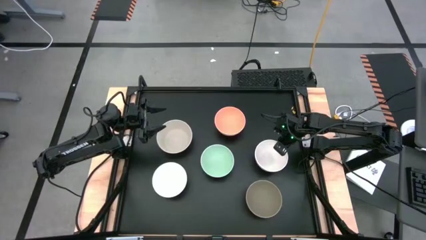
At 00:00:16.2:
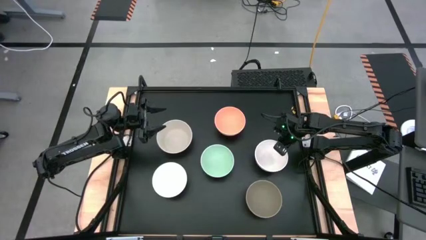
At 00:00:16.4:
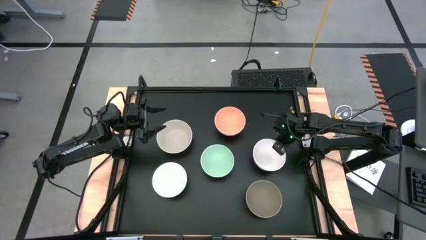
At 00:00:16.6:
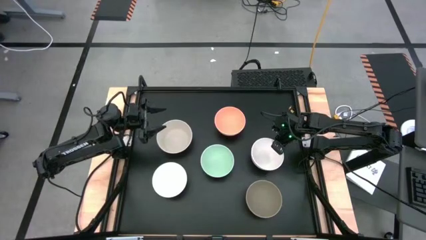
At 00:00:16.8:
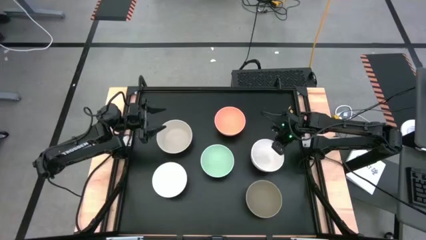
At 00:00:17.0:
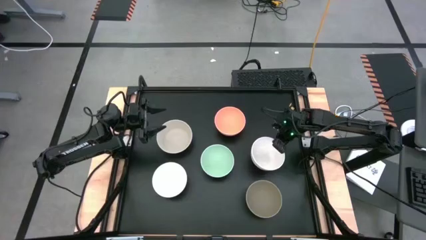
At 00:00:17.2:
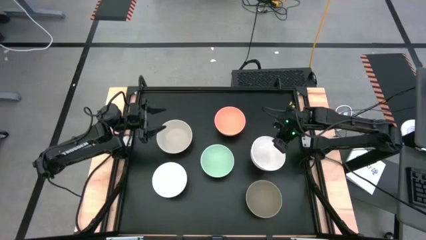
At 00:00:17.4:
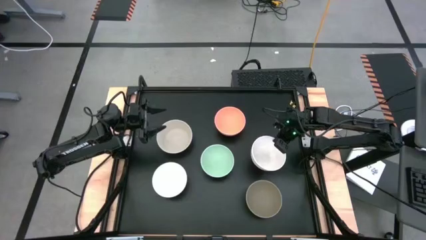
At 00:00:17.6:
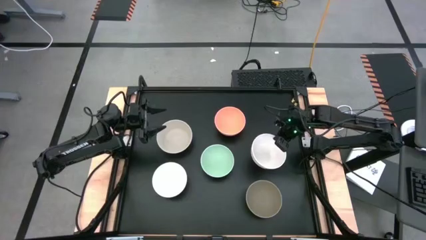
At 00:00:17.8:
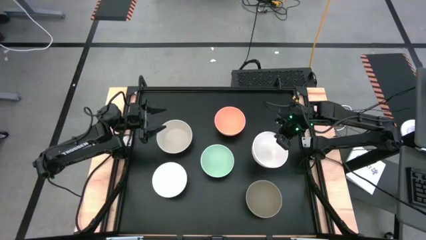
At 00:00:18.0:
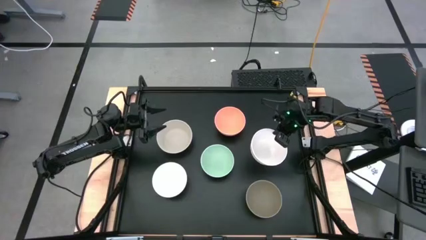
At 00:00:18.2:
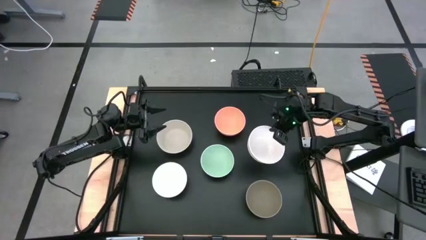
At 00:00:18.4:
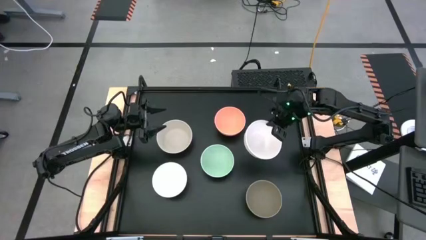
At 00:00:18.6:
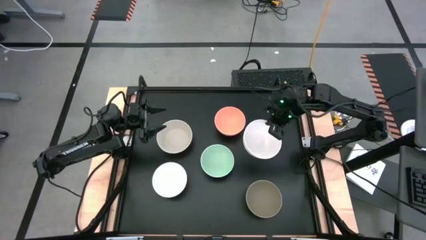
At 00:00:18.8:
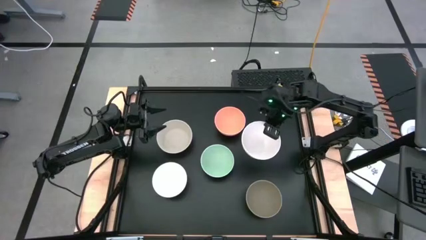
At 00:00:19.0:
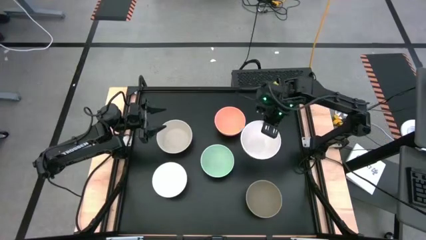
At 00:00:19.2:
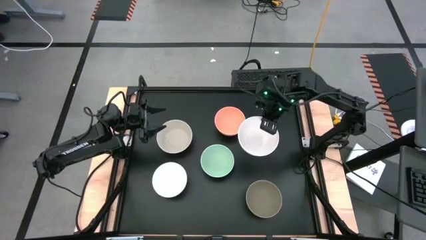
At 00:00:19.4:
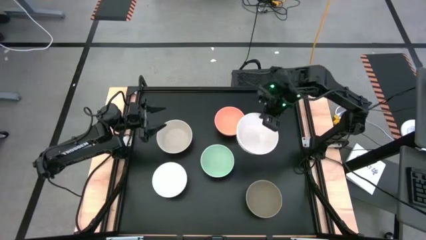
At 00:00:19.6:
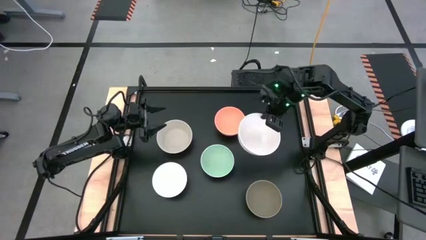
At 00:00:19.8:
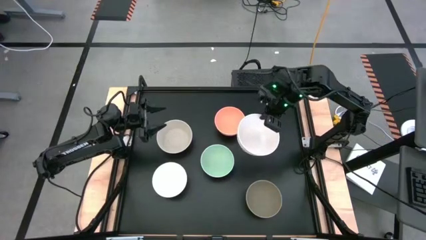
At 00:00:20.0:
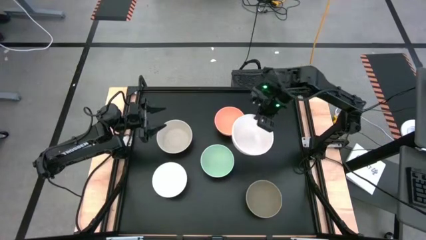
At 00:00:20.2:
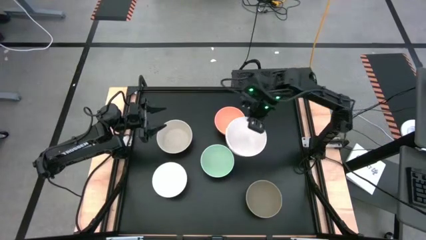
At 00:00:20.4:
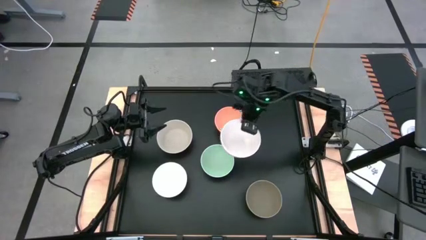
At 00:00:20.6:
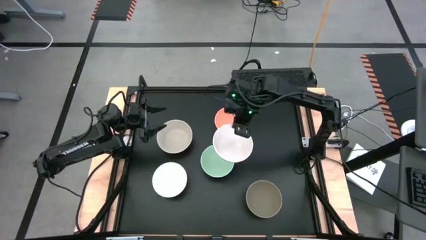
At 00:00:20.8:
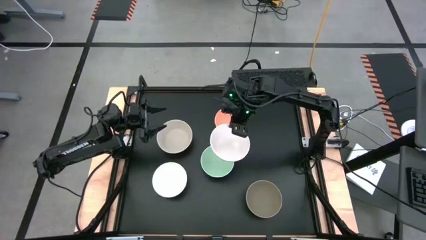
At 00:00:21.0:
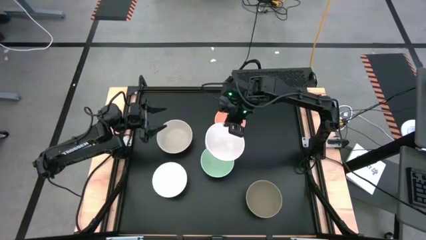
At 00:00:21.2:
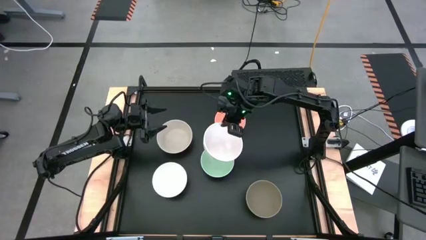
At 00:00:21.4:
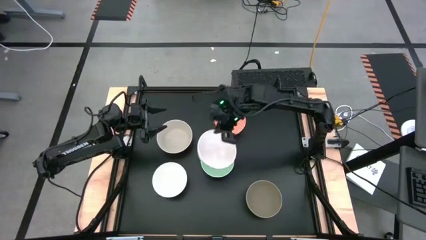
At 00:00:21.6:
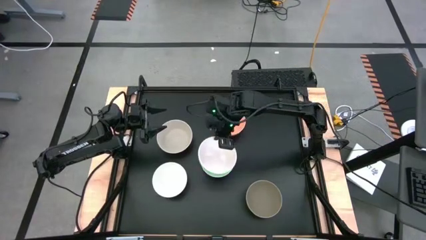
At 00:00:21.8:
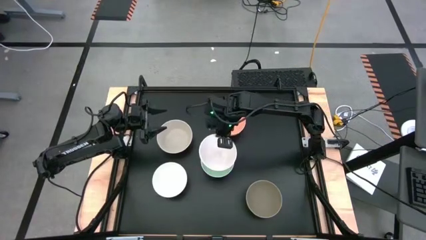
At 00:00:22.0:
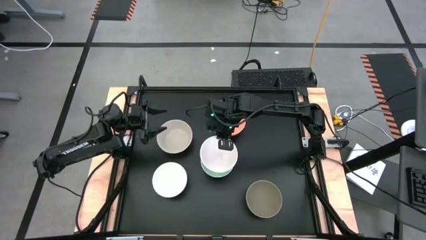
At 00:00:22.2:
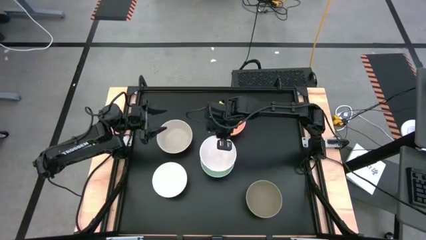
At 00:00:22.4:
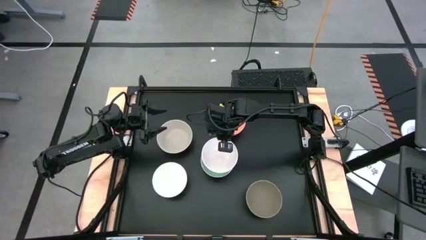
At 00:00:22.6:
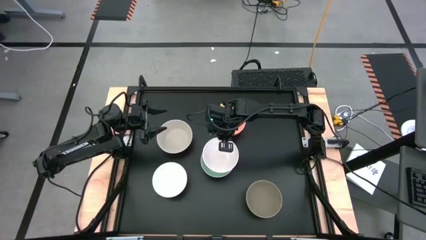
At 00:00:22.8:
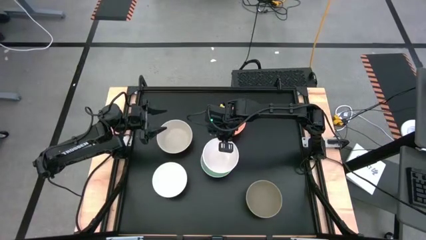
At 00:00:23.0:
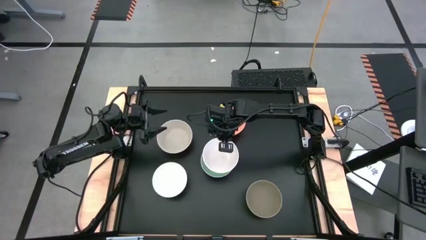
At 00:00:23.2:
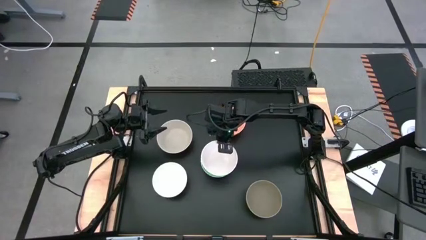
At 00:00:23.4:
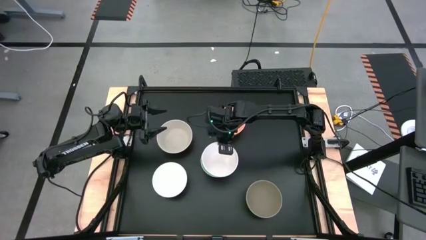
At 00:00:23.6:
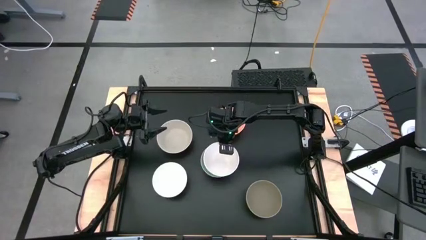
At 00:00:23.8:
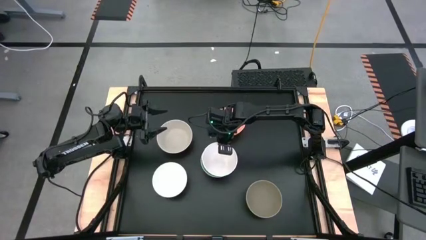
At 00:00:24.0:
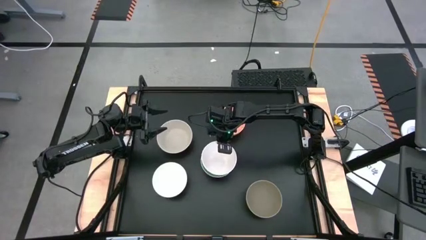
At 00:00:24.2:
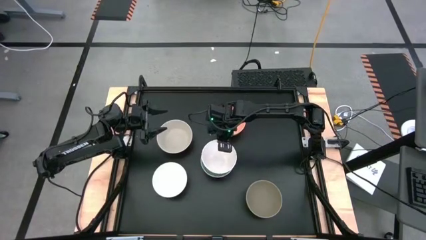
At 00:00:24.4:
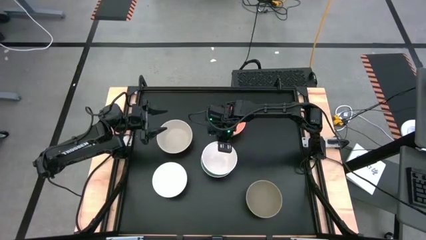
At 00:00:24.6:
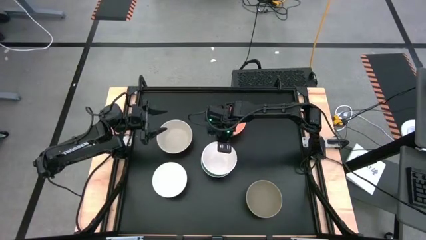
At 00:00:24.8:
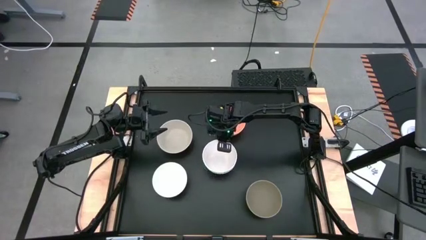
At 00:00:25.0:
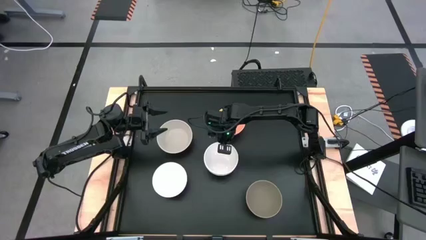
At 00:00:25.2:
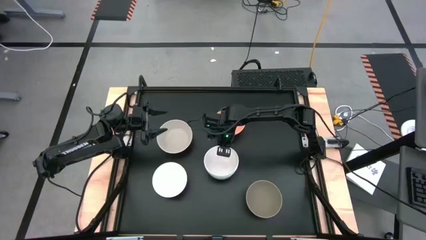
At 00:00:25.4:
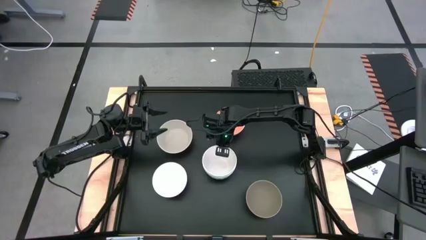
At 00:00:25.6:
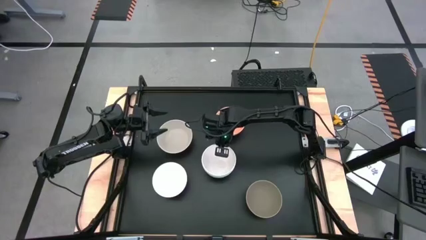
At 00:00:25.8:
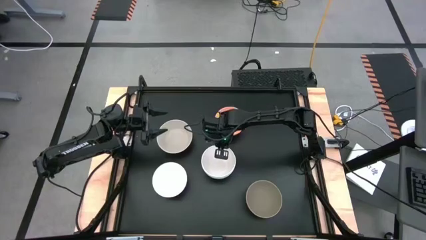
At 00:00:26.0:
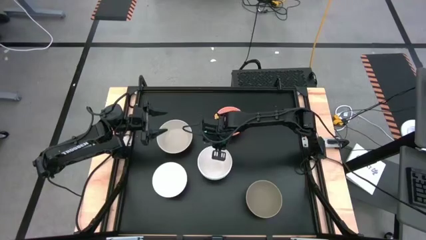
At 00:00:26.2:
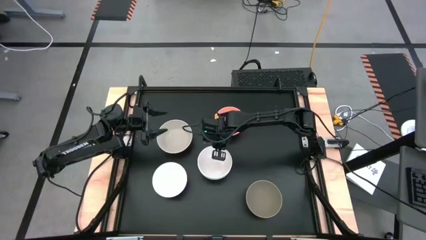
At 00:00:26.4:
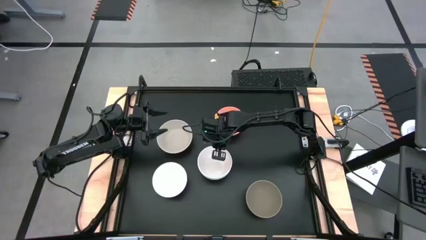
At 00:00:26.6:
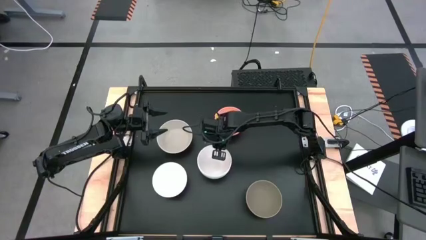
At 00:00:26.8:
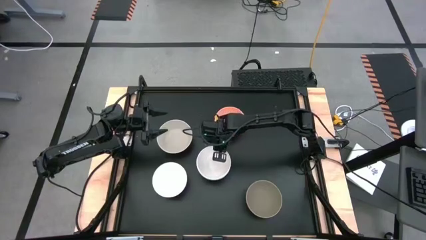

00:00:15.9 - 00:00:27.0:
Task: Nest bowls inside each other
Stack the right white bowl on the green bowl

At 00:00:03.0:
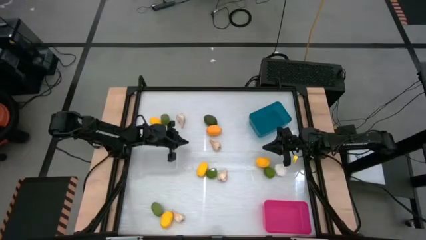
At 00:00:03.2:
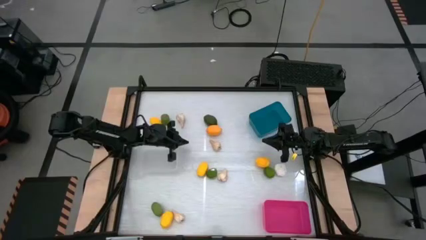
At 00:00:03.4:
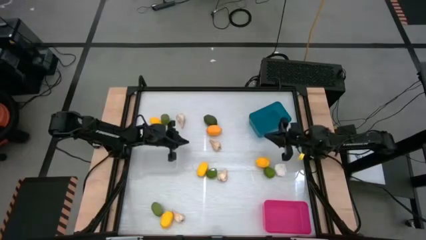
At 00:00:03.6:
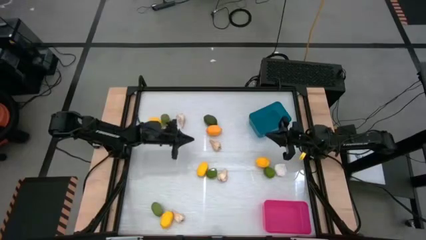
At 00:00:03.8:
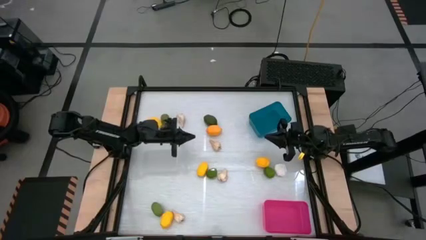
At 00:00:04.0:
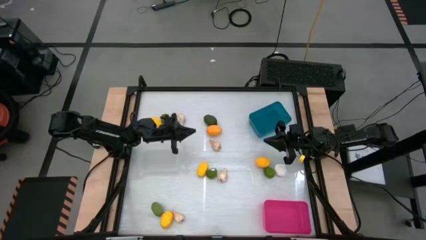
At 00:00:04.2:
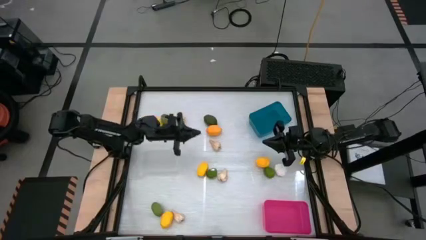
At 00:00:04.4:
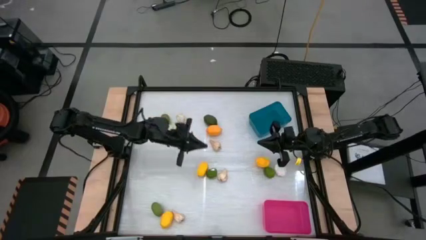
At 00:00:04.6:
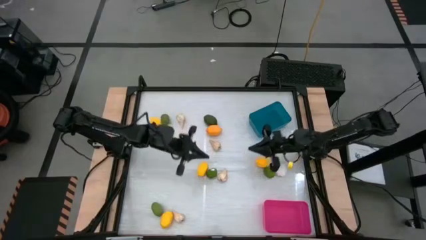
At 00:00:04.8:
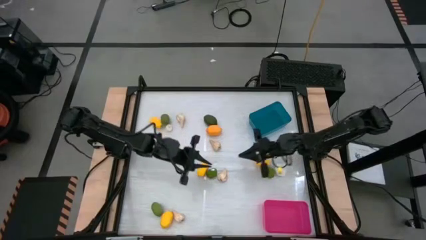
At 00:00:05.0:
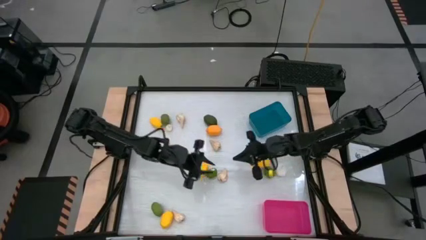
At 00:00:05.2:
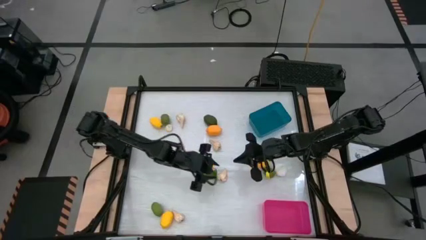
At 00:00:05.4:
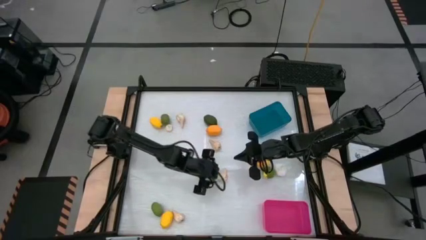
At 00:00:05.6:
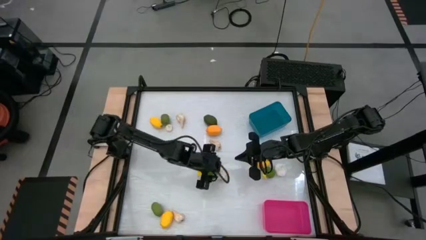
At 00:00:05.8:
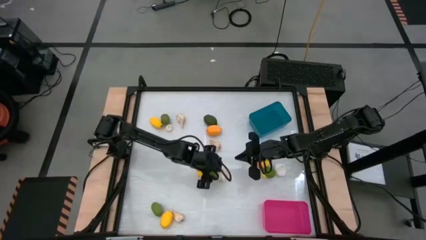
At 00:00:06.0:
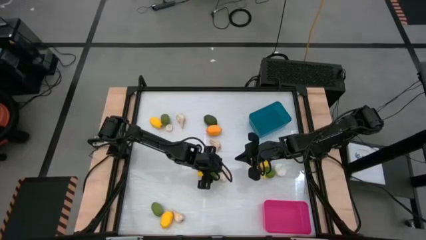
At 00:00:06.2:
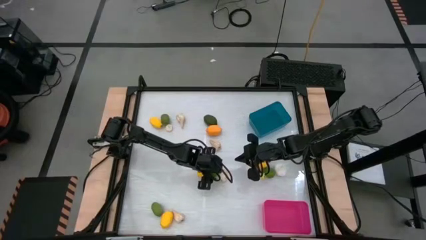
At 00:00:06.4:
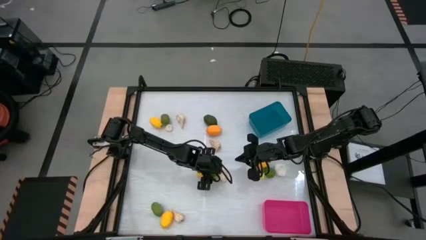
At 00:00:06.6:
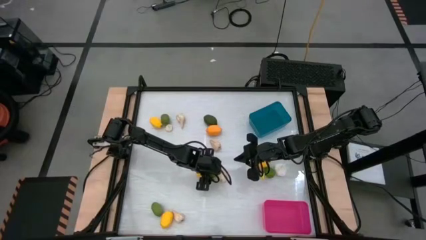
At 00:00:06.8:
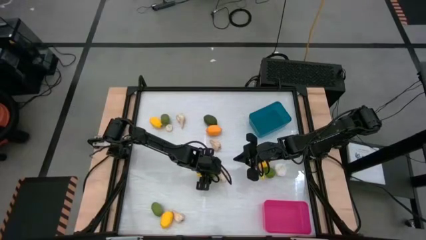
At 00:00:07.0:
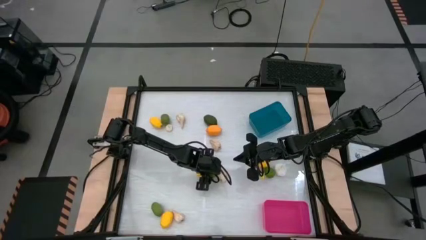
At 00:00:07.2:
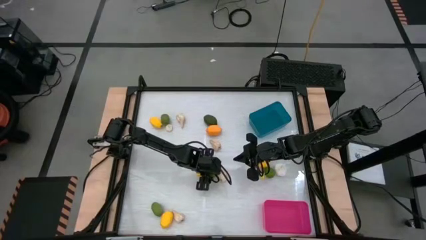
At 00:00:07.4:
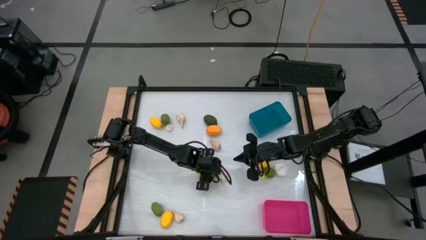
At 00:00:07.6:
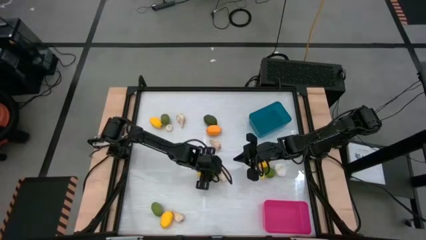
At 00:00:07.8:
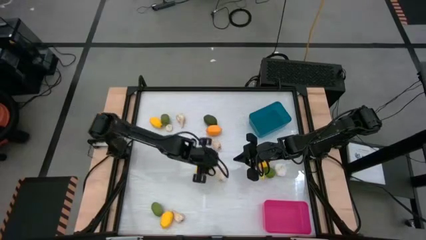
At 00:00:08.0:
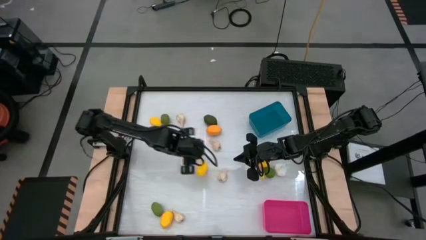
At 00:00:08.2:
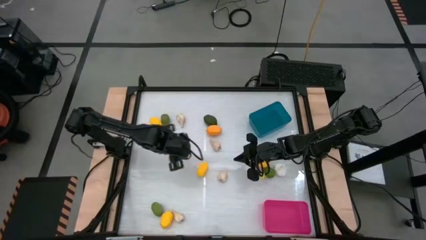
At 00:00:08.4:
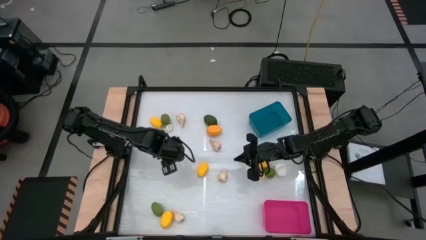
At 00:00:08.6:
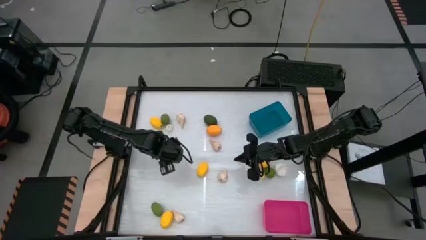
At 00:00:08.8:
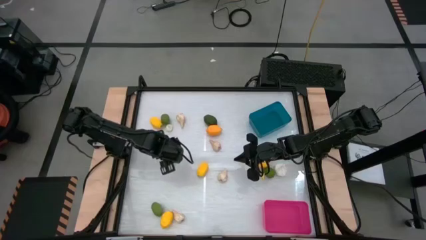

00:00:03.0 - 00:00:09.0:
Task: Sort produce into baskets
Put the green lime into the transparent bin
